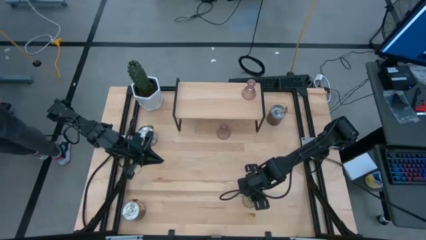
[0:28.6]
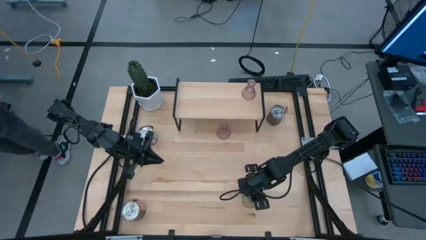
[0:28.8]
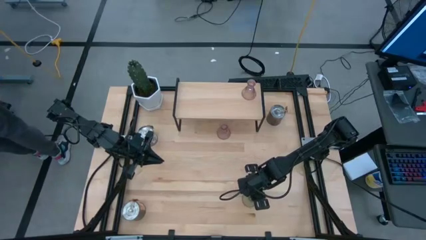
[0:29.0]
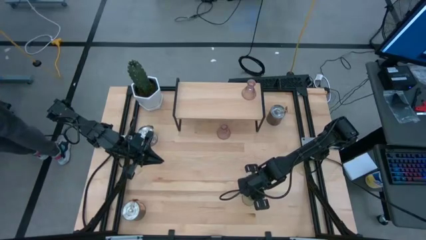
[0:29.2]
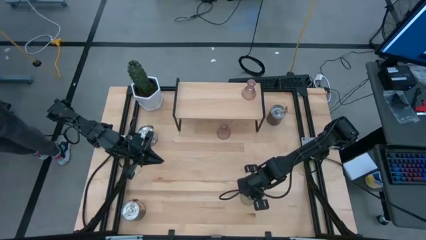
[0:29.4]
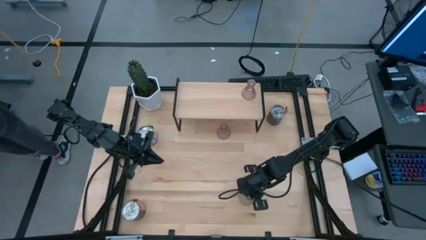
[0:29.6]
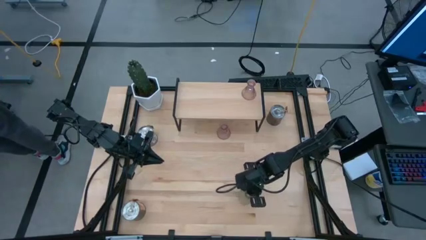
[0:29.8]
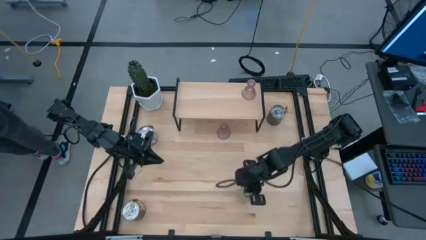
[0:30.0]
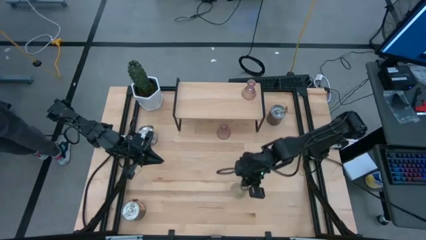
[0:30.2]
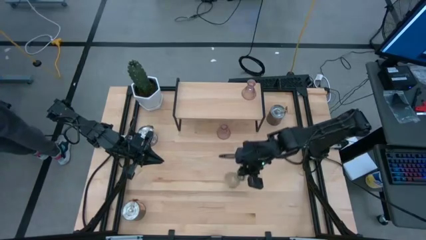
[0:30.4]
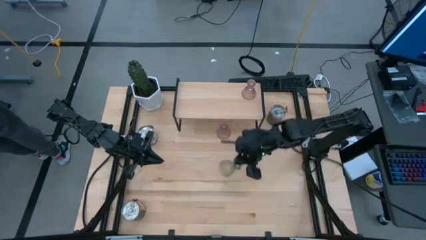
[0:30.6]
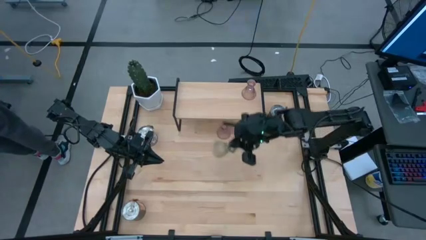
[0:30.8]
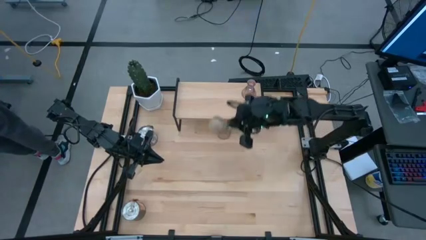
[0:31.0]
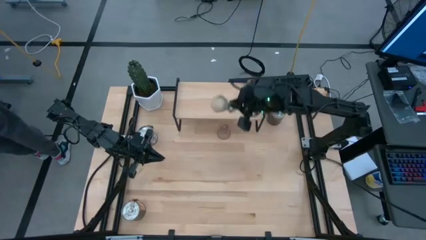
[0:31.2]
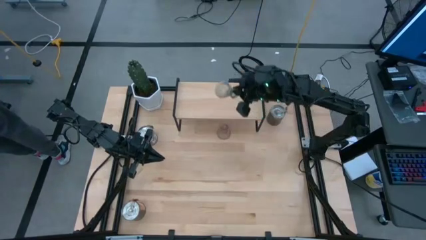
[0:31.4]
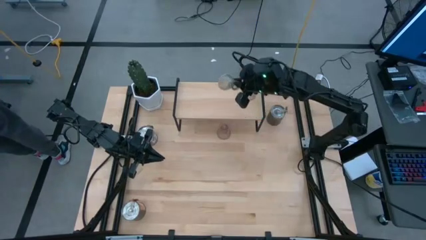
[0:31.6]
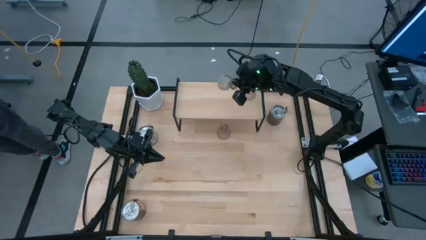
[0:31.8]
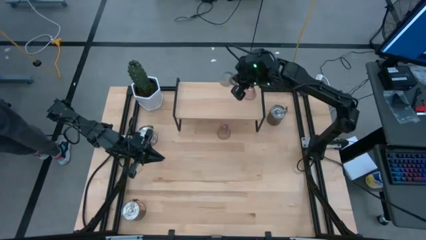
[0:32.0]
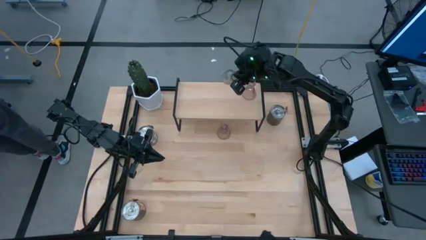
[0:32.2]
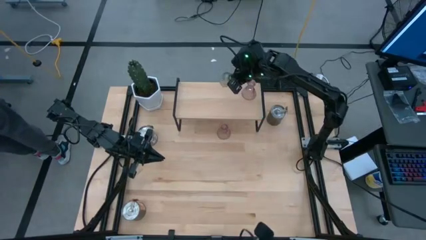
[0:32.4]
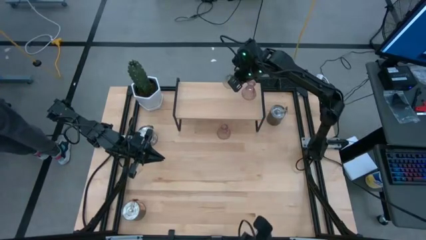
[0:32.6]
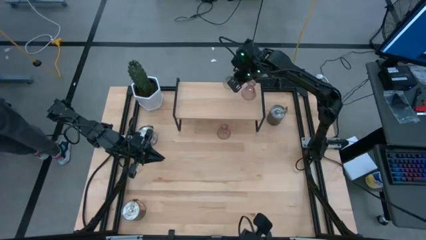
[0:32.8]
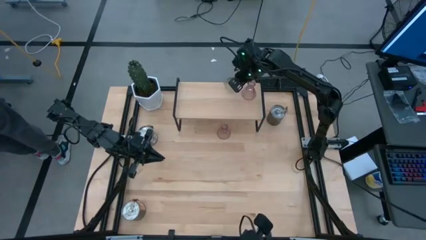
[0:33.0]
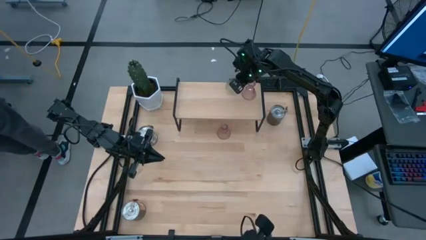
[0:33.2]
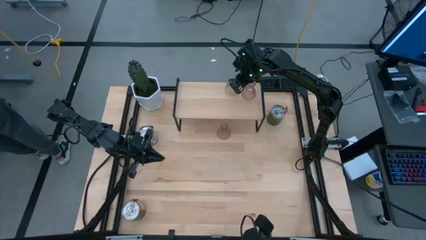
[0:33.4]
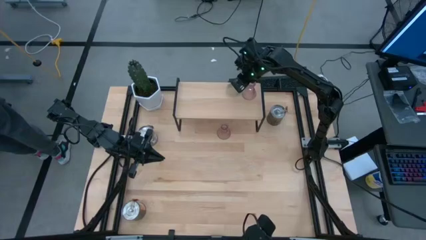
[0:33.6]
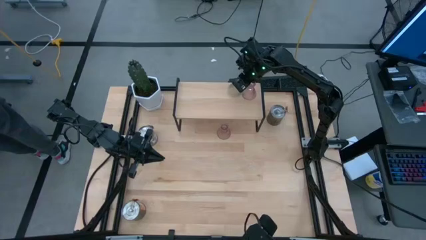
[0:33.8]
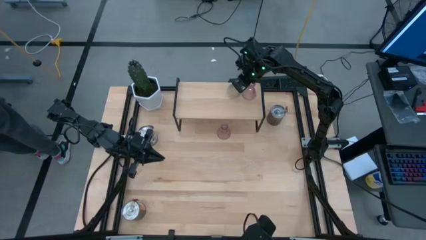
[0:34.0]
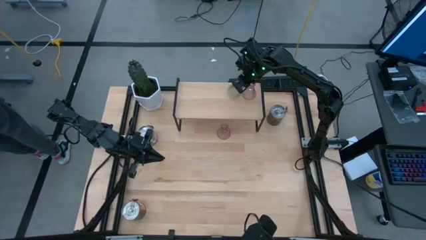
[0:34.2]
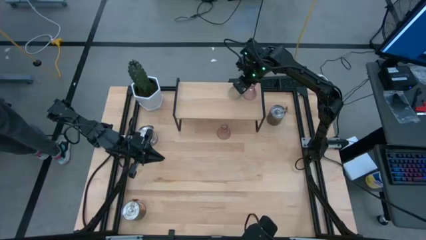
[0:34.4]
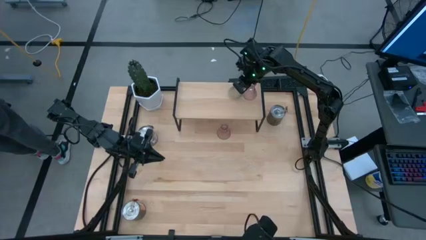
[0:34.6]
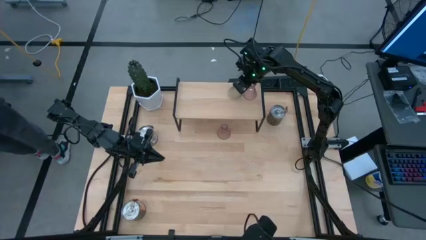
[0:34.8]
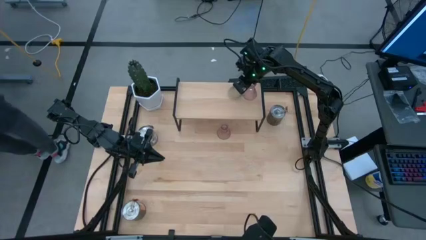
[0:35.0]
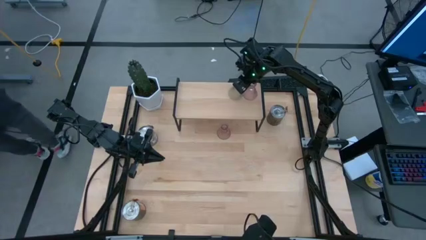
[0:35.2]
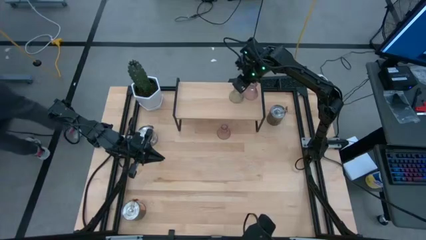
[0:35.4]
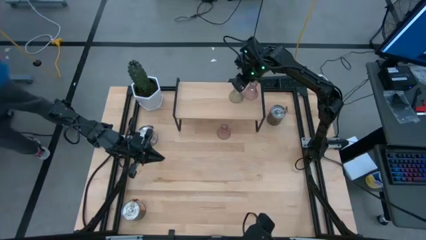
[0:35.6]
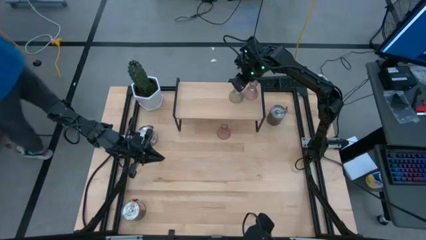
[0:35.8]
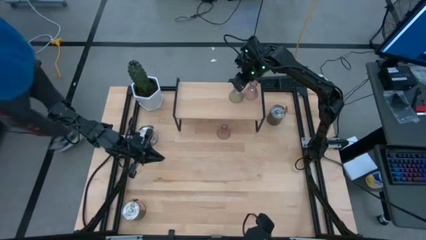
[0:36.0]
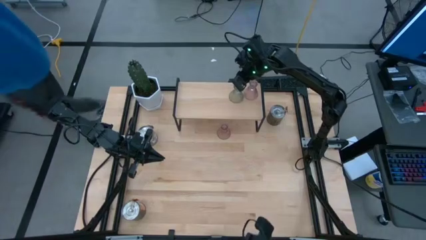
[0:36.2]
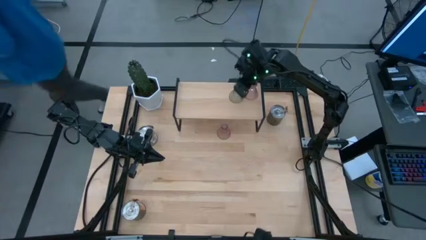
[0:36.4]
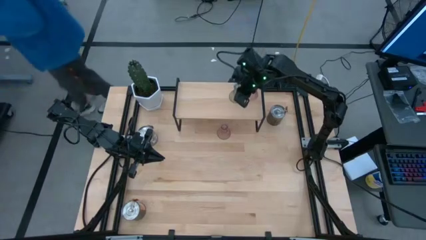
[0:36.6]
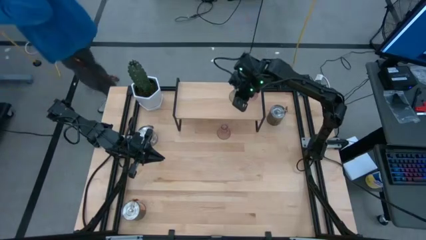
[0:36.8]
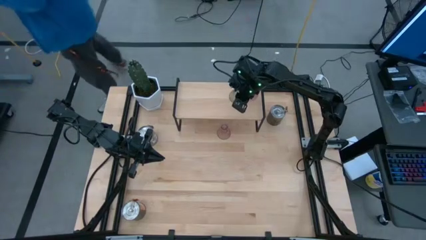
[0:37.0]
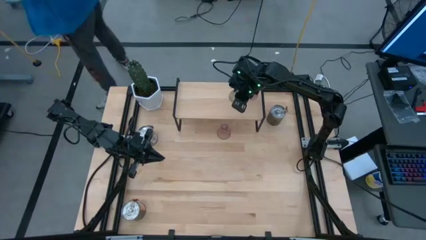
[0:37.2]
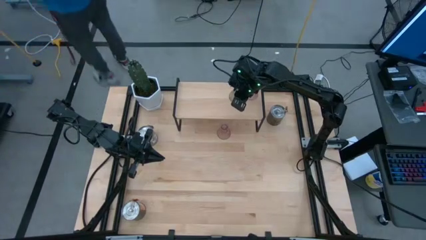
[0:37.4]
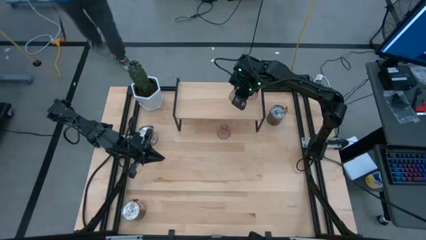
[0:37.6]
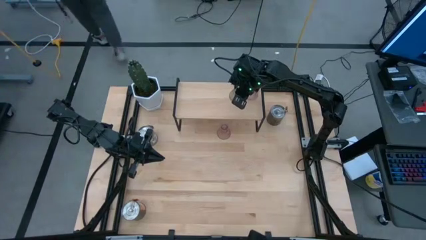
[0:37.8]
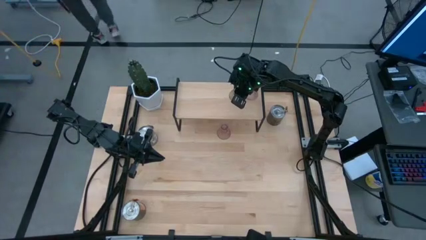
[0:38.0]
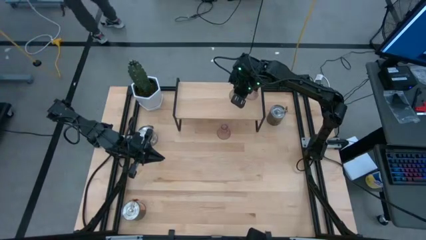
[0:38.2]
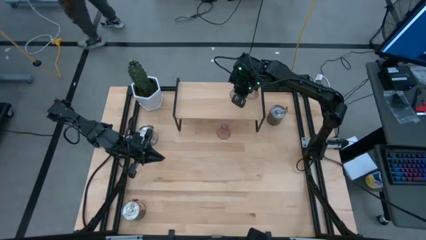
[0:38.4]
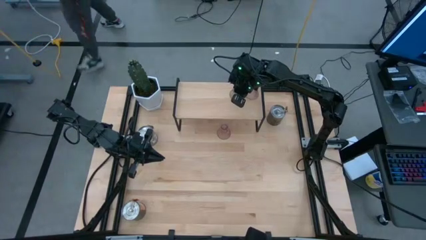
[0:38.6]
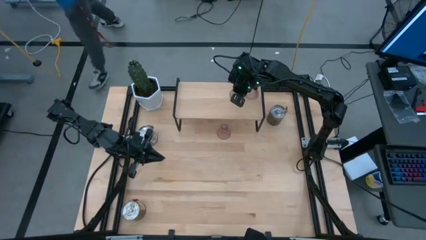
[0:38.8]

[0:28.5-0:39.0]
Task: Pick & Place candle stick holders
Put the green scented candle on the shelf
